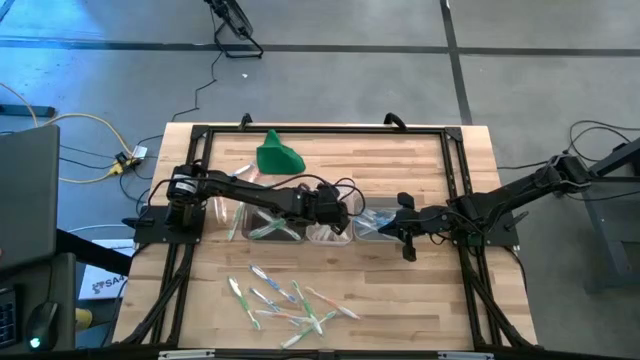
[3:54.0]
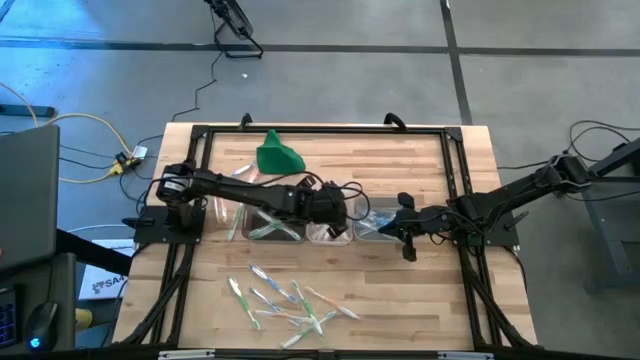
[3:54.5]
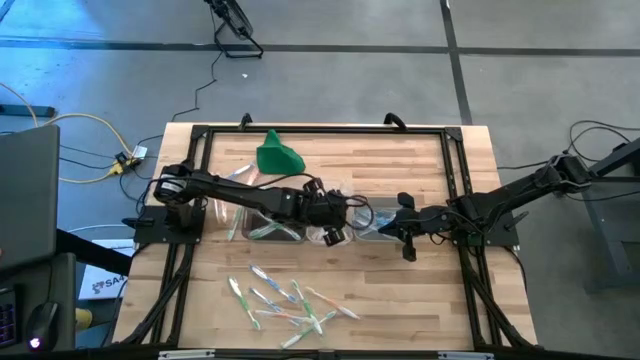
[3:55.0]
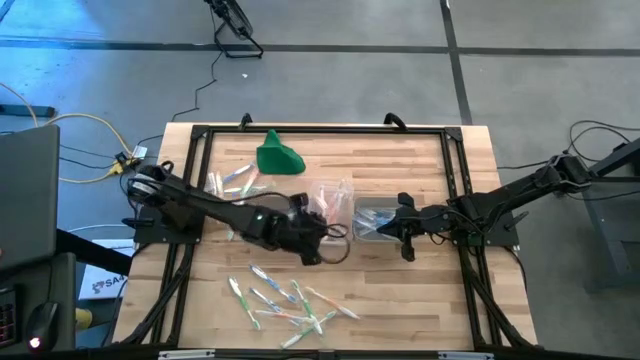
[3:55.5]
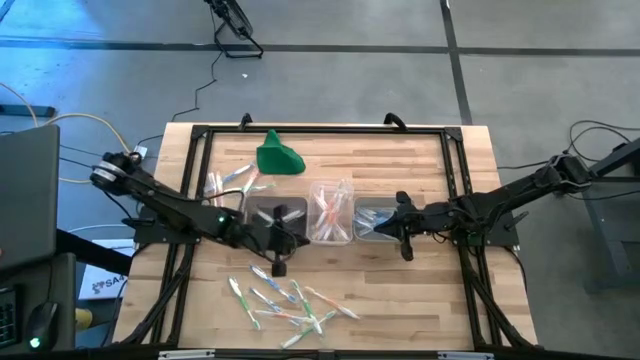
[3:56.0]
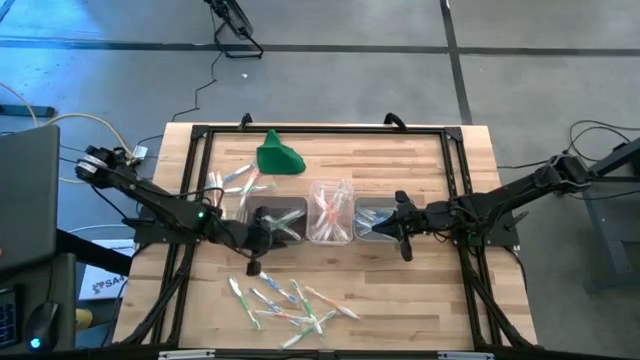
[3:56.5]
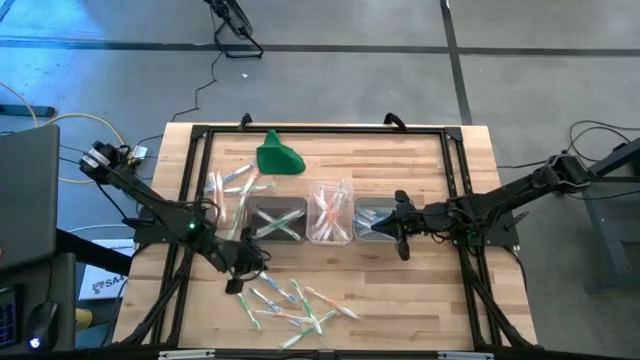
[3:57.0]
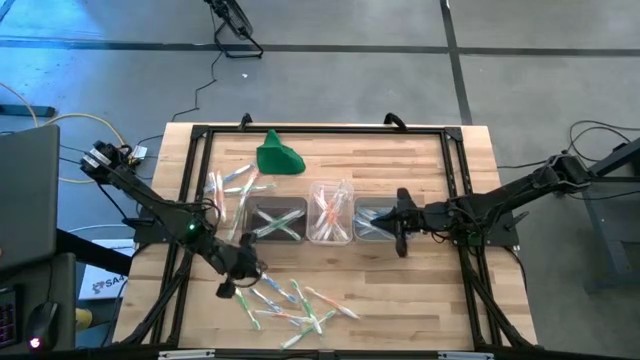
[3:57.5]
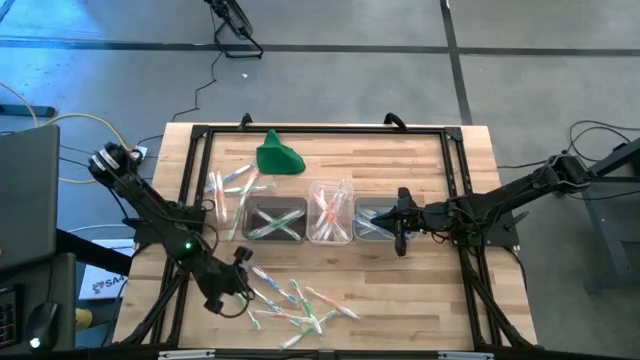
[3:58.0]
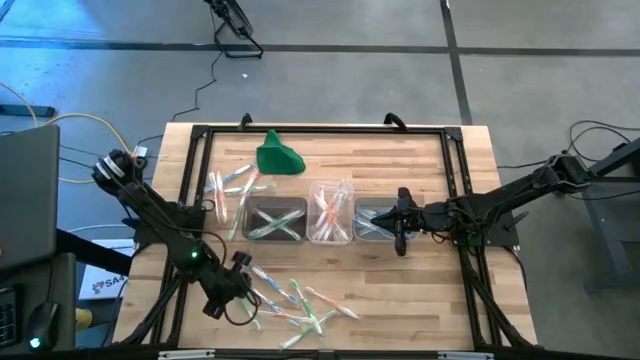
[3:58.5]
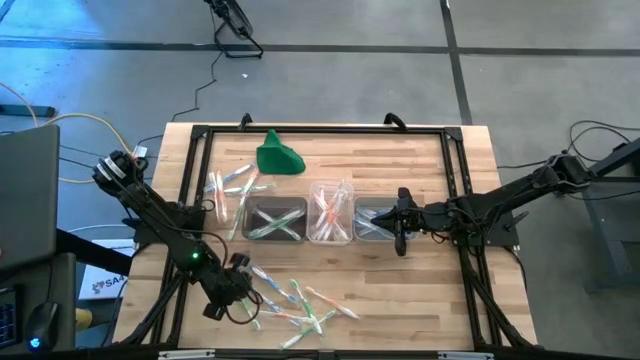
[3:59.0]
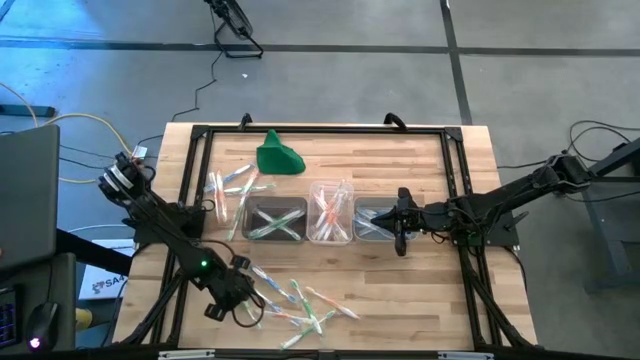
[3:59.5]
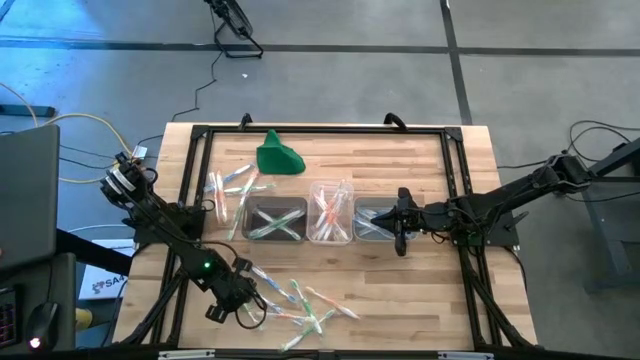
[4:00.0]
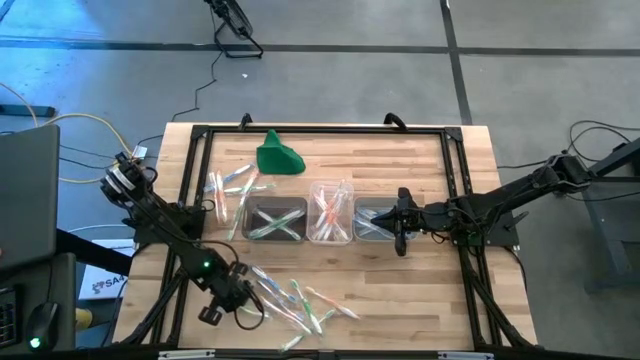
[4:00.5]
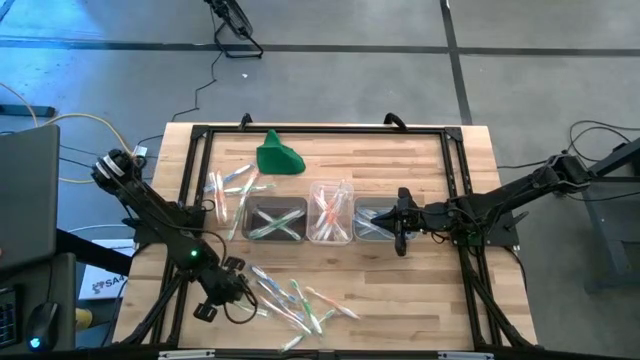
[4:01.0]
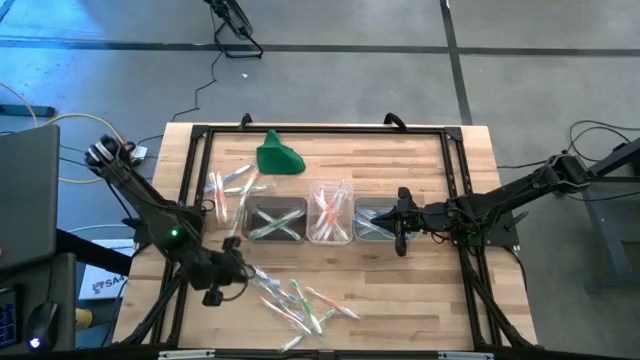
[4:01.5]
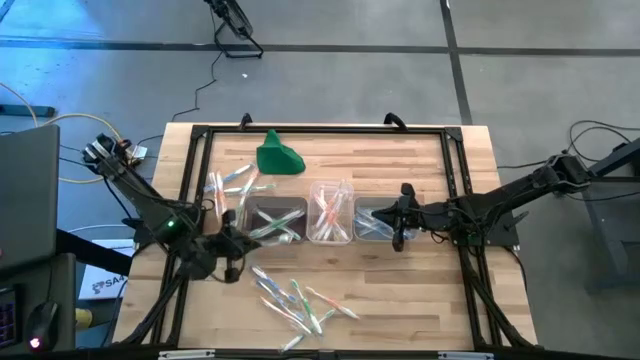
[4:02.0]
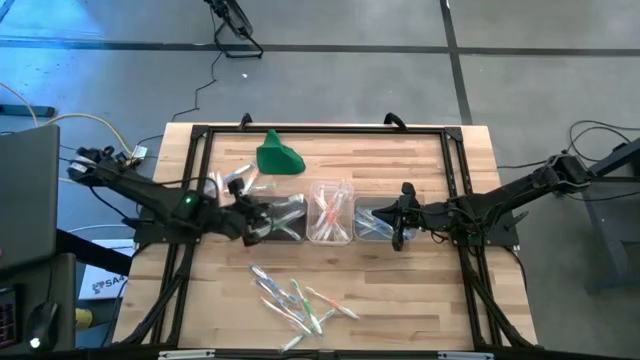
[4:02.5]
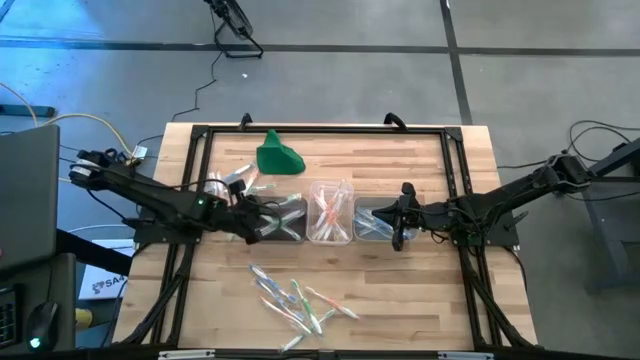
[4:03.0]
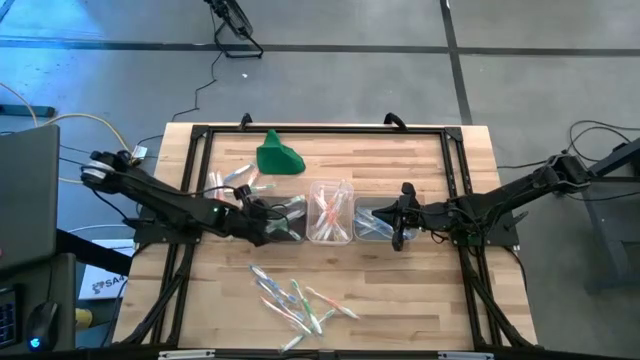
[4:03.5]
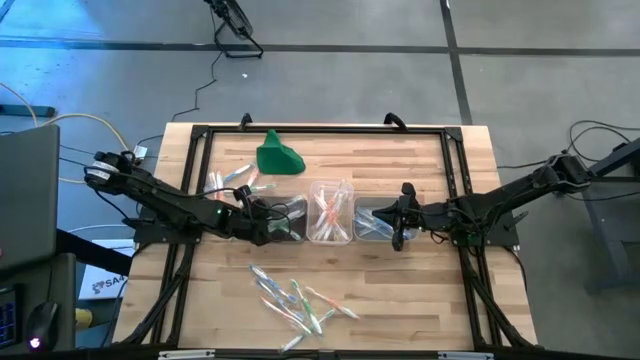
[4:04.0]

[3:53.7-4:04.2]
Task: Pick & Place Toothbrushes
Put the green toothbrush into the black bin

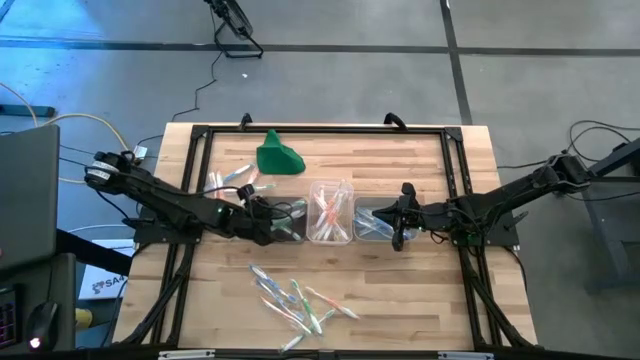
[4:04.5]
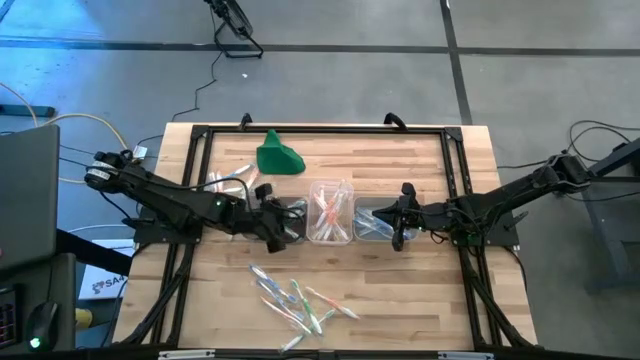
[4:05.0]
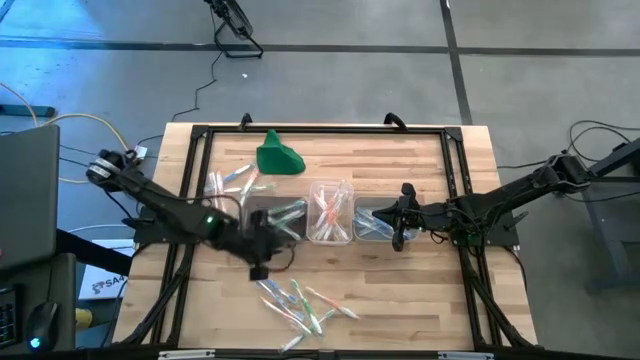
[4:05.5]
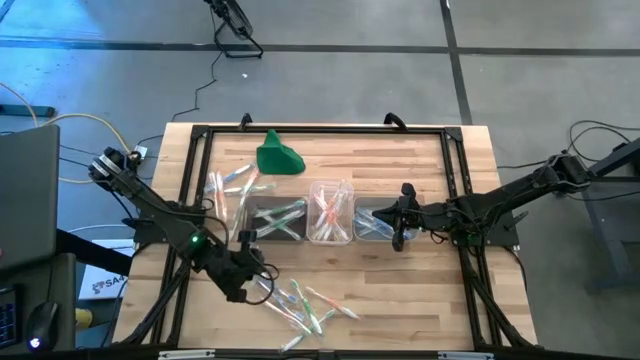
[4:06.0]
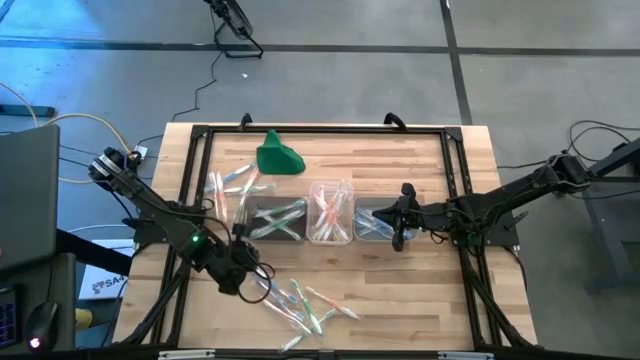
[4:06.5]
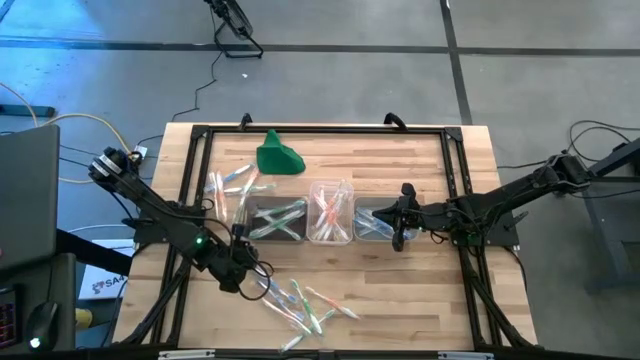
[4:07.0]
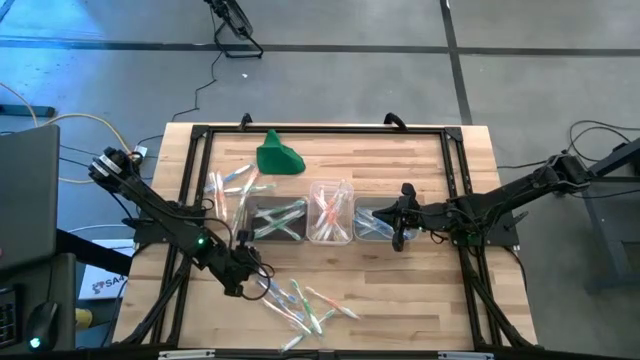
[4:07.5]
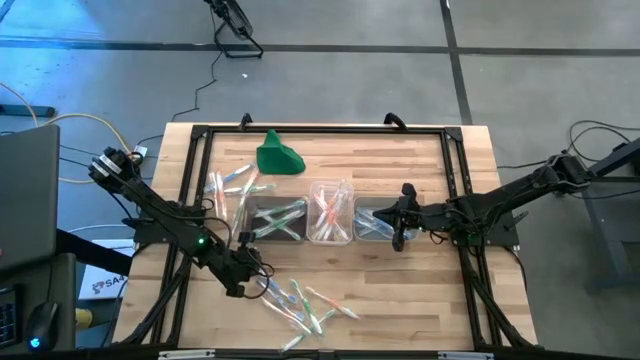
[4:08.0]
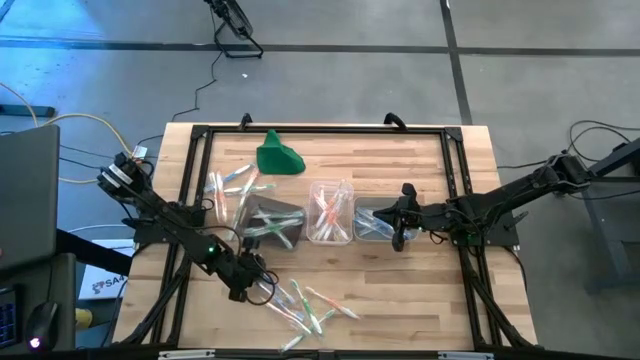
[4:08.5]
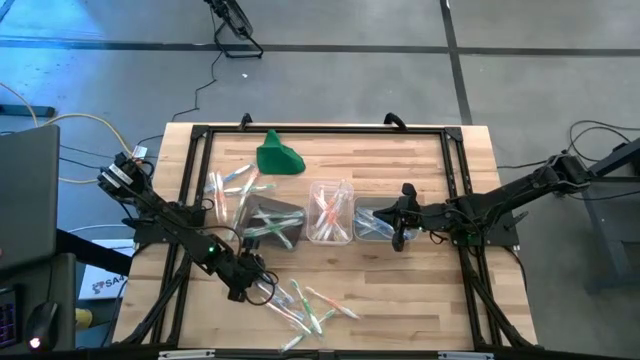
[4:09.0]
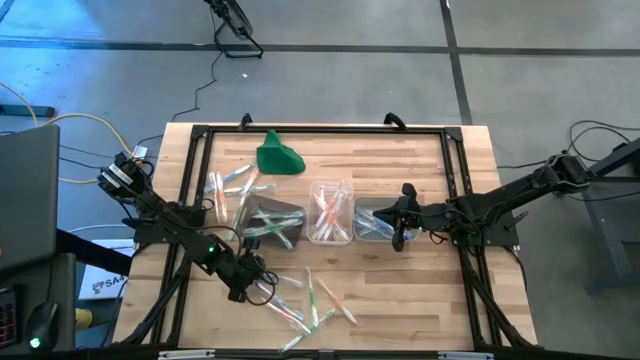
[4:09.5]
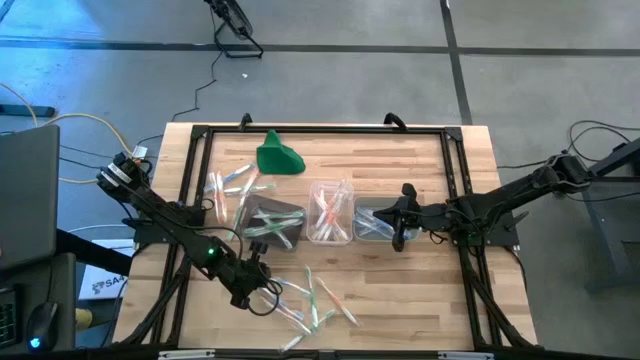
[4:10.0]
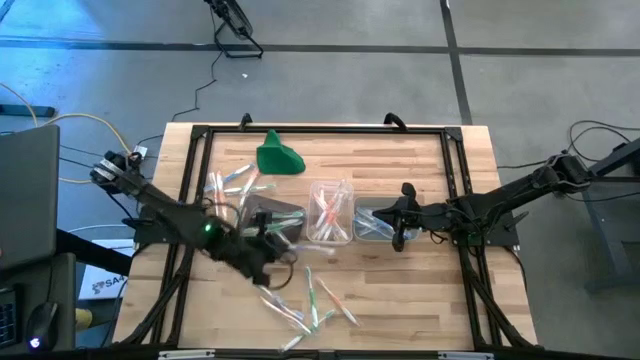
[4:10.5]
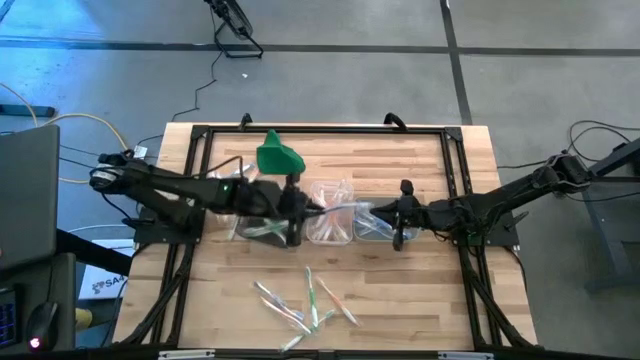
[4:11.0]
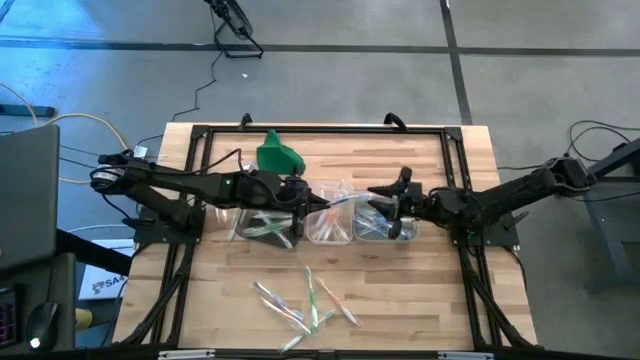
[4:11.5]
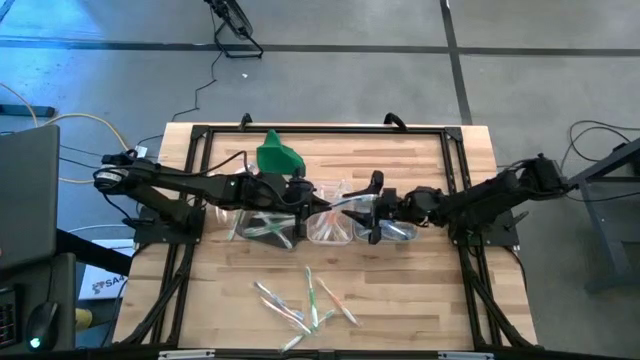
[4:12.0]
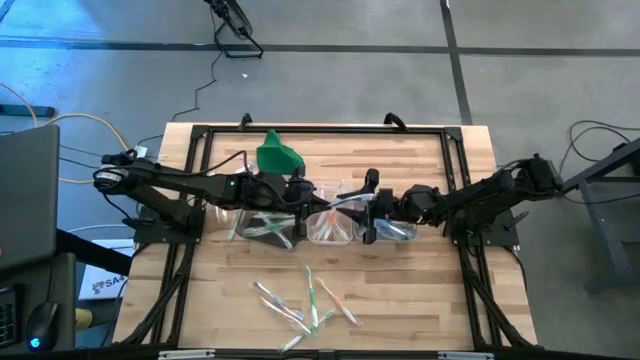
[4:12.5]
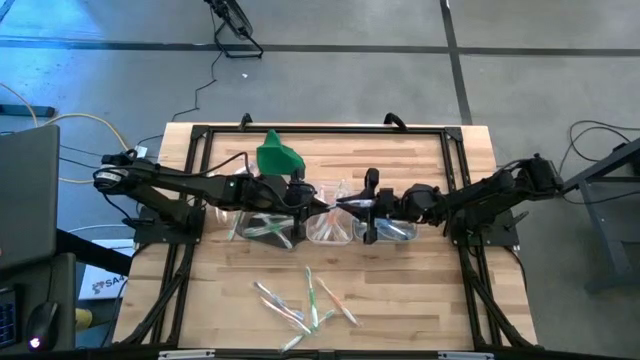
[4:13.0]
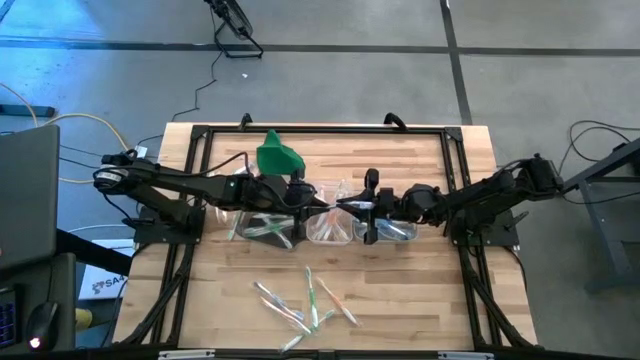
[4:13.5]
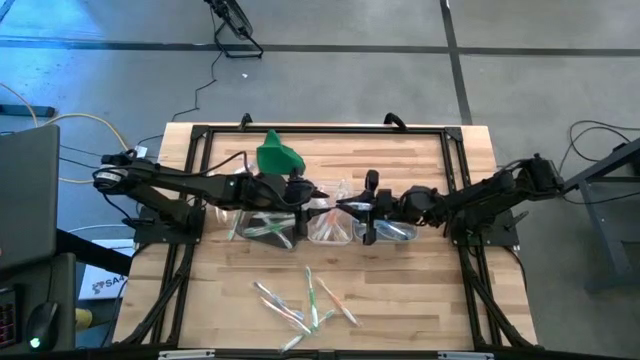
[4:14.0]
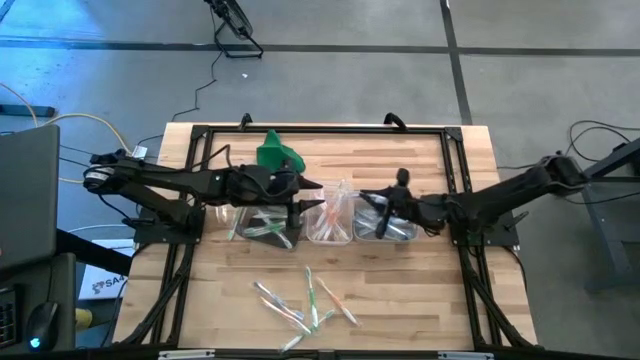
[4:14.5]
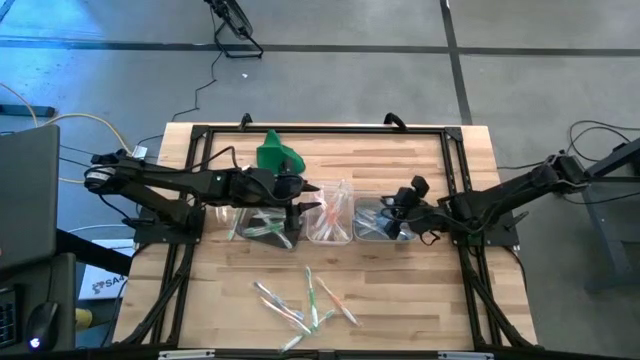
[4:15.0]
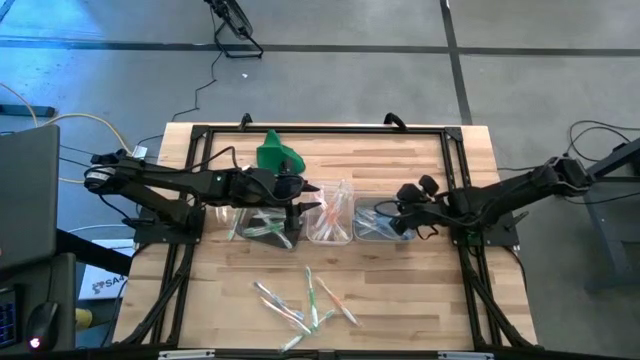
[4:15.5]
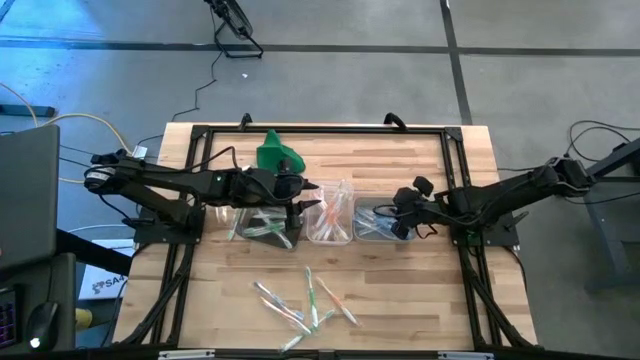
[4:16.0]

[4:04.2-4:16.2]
Put the blue toothbrush into the gray bin
